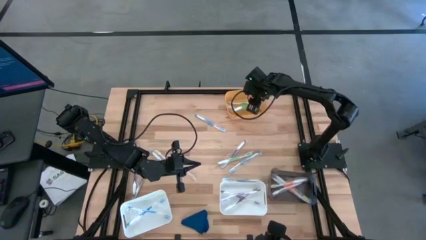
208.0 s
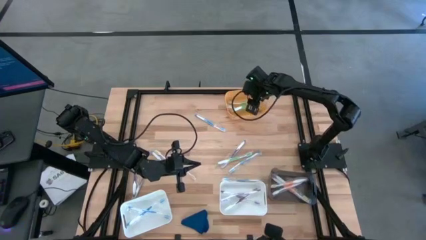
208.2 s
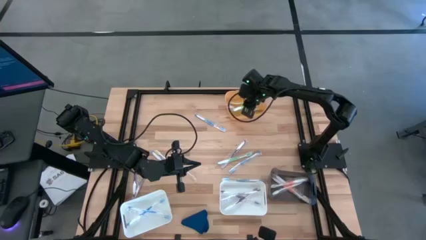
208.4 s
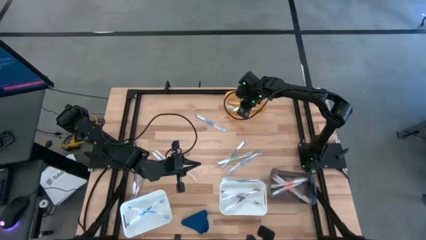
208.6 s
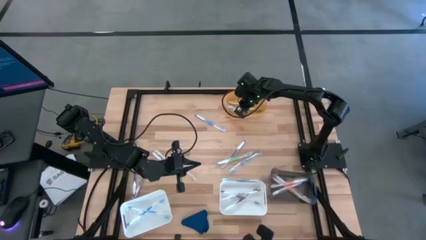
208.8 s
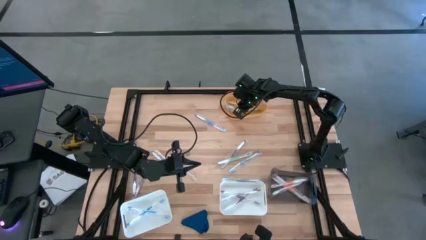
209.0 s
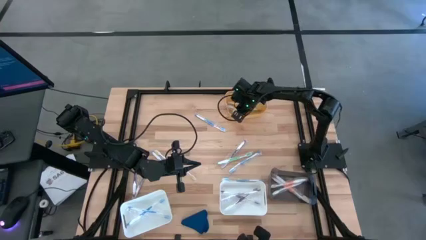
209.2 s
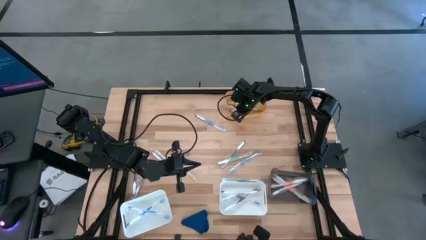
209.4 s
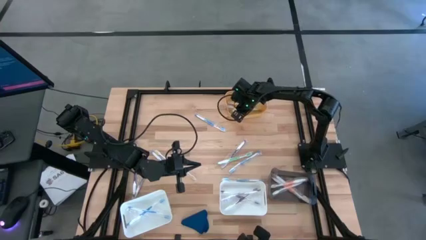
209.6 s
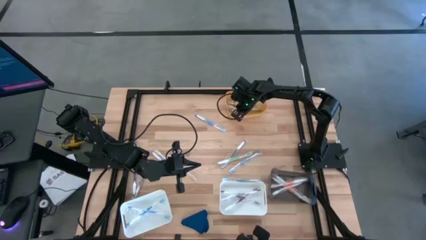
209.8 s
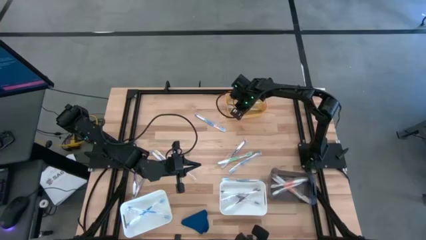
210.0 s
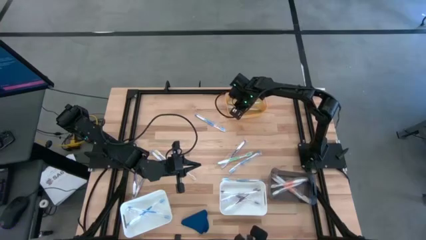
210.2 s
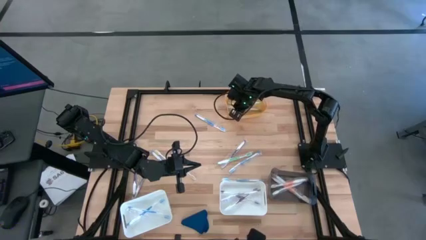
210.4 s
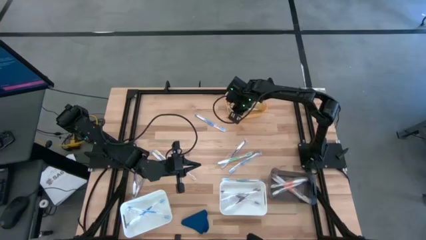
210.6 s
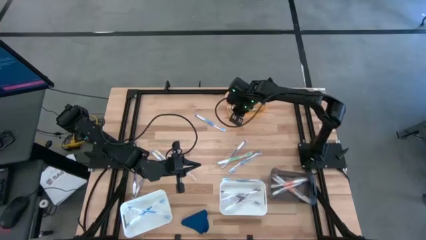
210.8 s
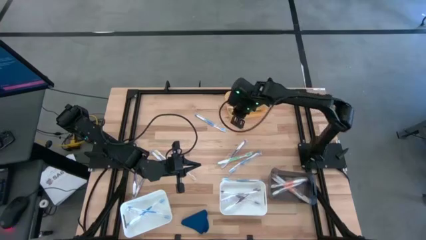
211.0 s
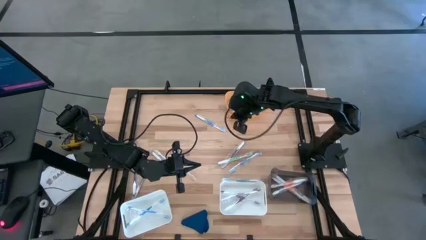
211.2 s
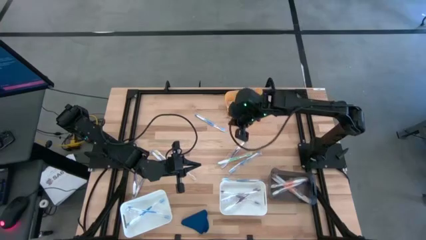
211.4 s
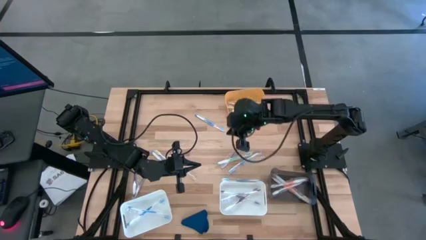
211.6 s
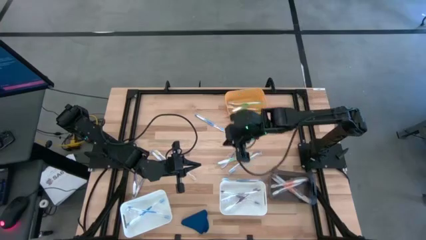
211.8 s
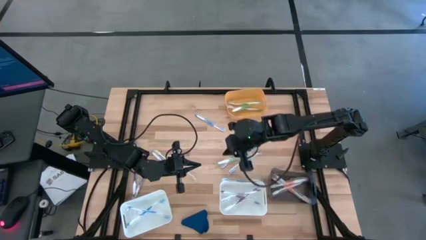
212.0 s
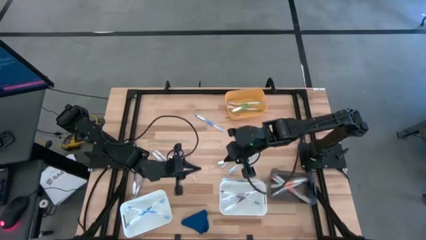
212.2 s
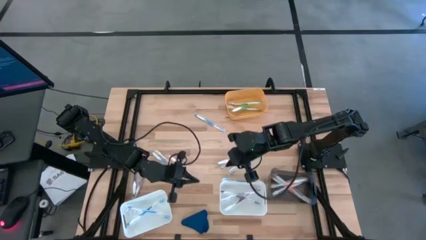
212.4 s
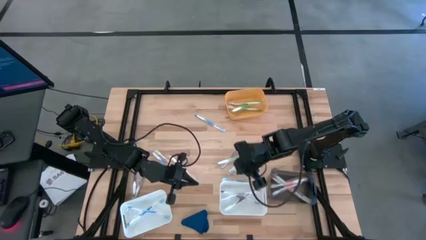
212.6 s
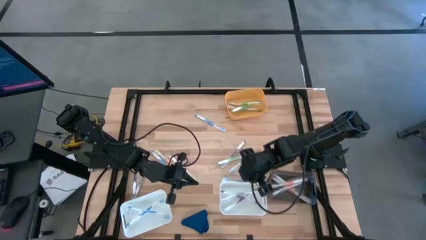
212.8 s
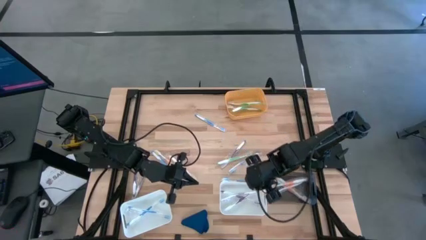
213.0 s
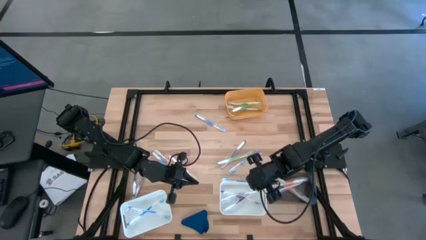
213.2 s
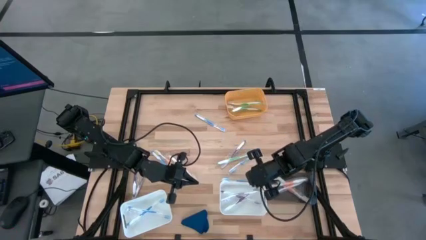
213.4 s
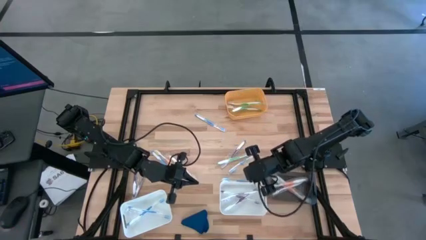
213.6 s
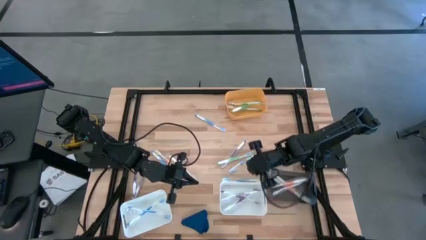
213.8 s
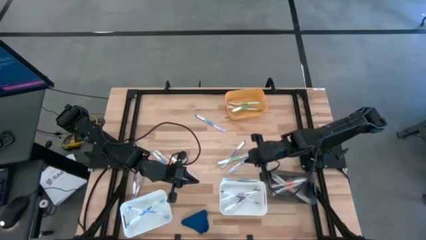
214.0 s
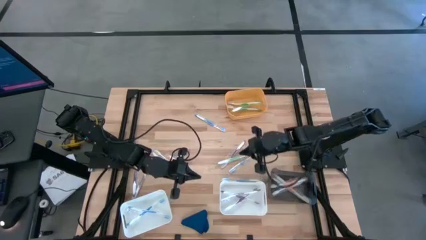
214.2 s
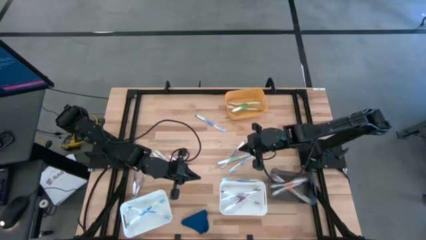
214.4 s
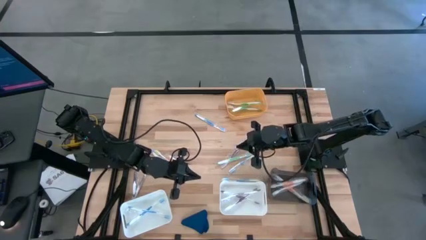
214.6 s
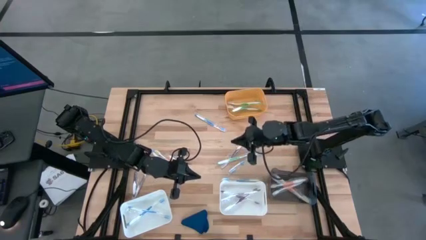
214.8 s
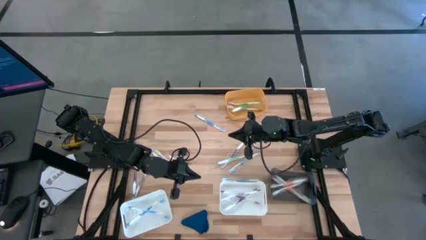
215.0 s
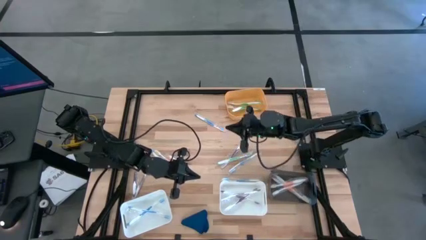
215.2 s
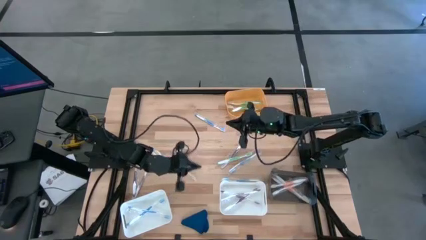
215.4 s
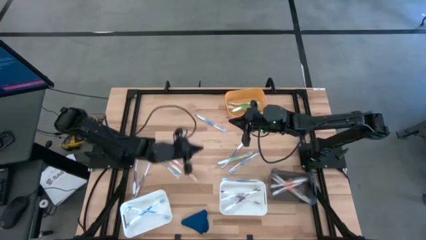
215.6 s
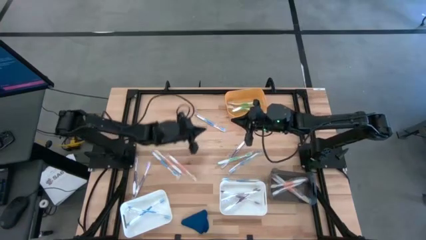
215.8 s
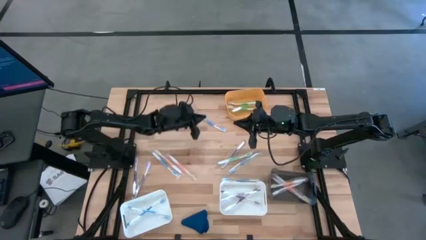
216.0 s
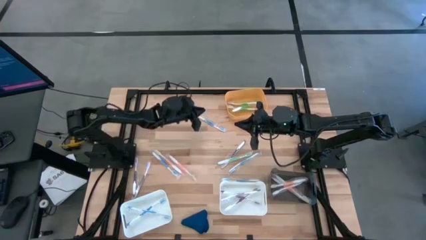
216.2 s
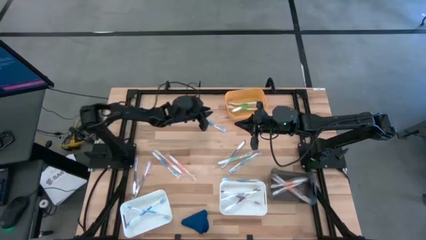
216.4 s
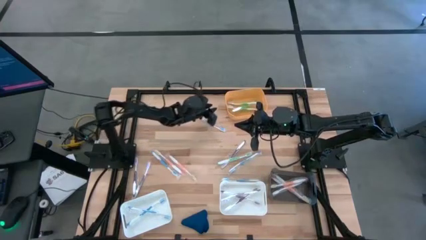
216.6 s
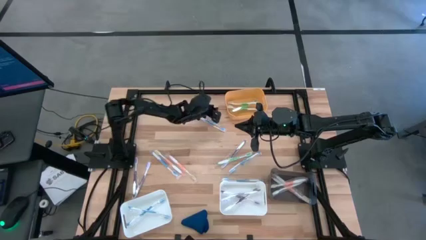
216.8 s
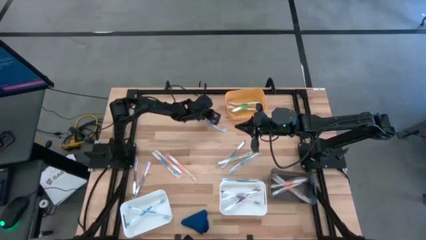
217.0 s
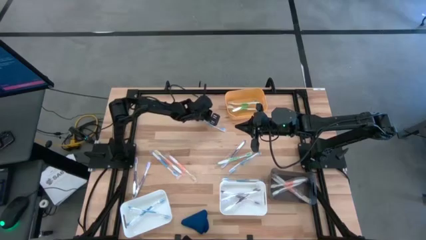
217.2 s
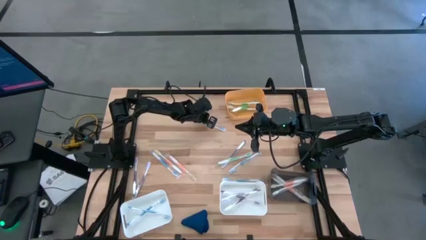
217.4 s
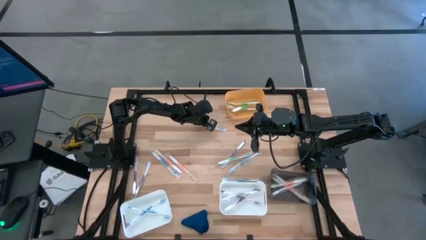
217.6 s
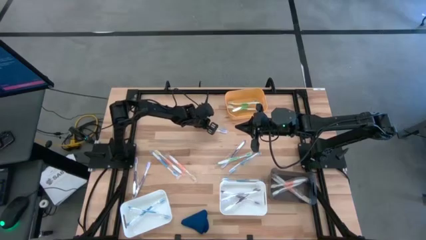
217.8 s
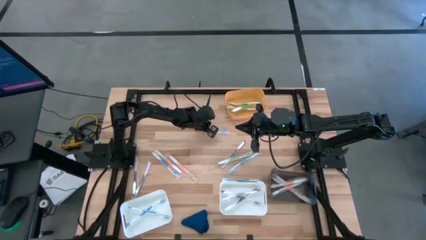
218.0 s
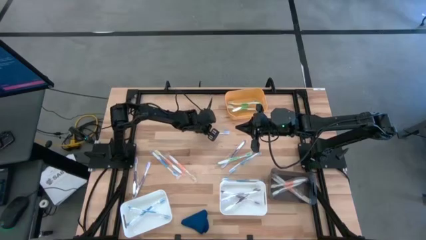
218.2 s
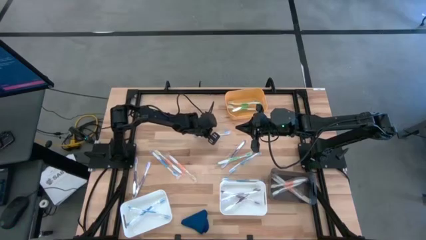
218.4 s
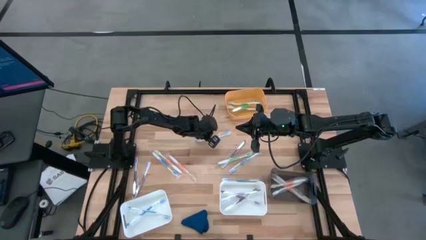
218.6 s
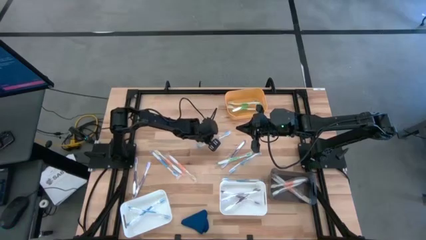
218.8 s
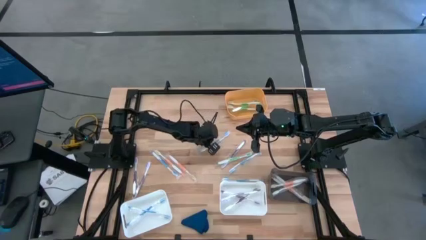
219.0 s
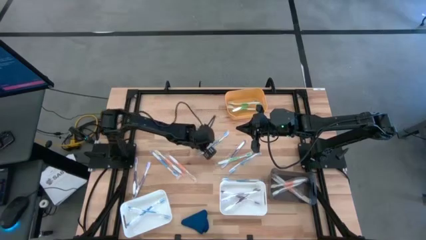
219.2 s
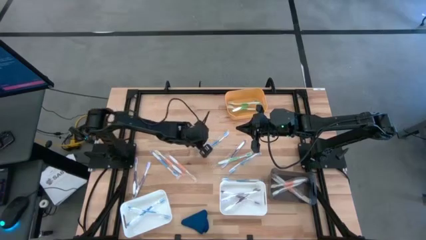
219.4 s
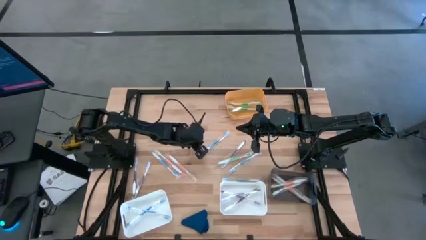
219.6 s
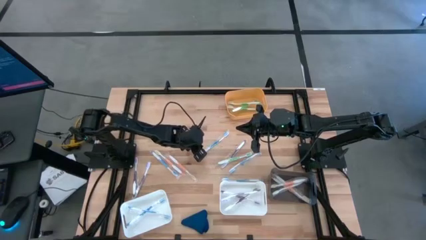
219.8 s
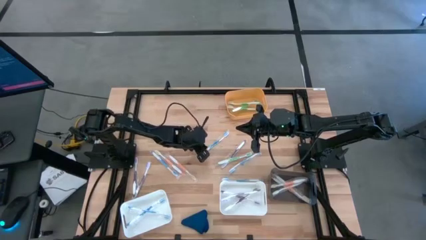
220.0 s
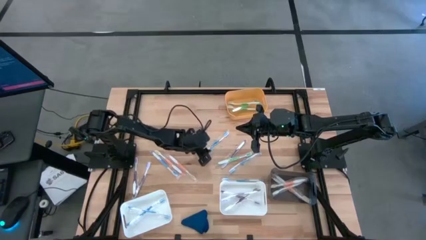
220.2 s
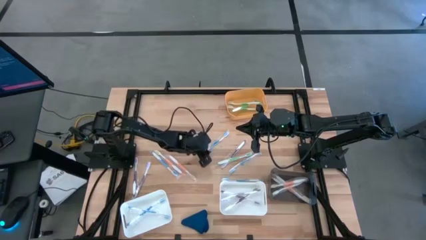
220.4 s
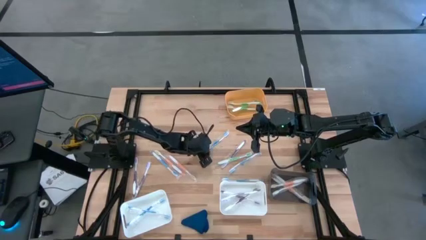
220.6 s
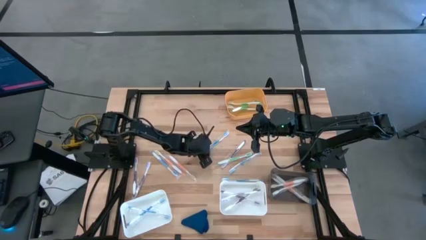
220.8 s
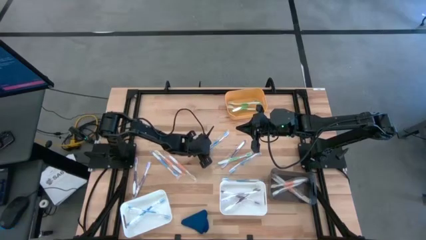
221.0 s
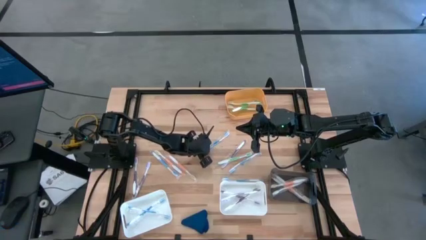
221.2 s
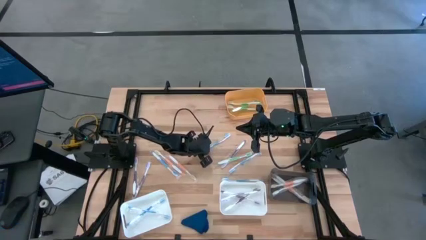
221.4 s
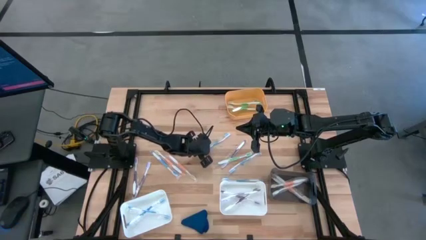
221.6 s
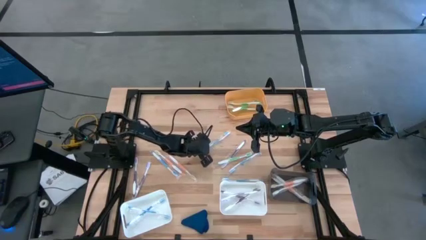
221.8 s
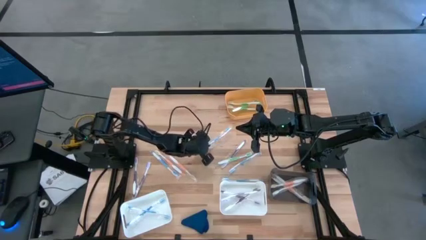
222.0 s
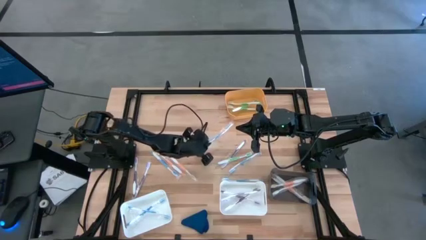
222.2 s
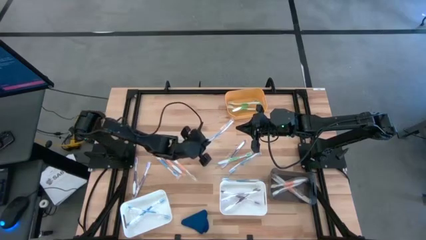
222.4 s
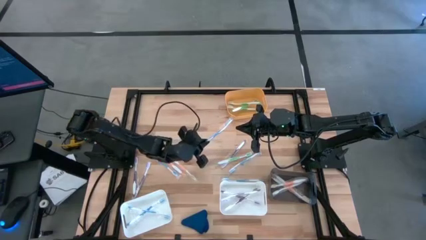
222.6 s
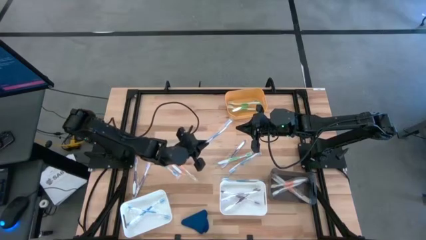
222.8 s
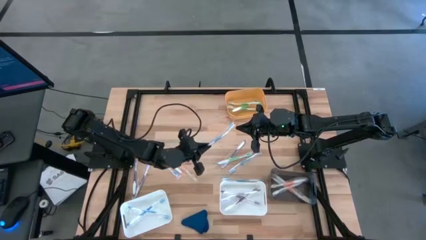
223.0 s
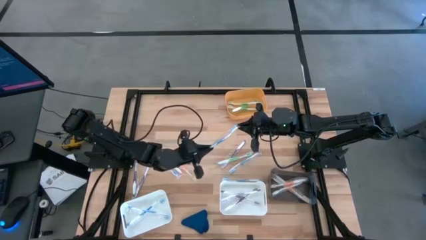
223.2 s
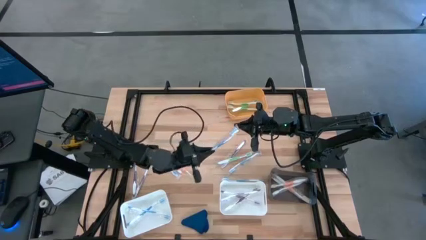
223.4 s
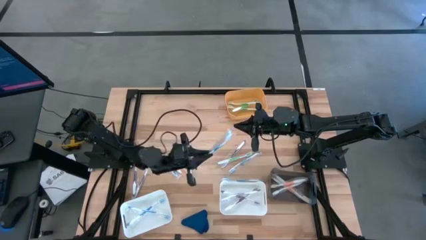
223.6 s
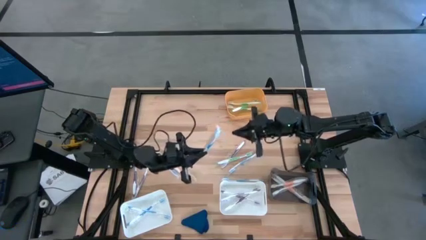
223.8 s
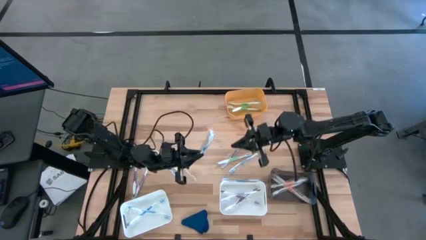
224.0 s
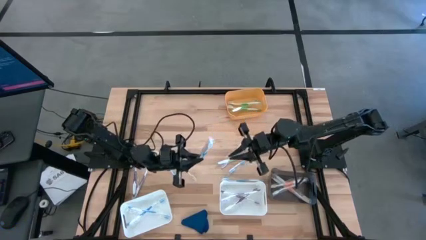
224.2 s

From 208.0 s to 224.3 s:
Task: Pick & Place Toothbrushes
Put the blue toothbrush into the left white bin
